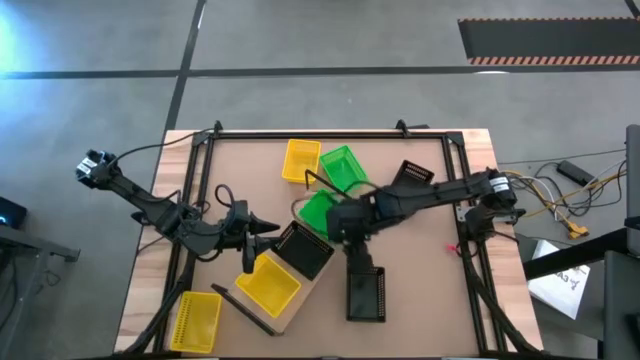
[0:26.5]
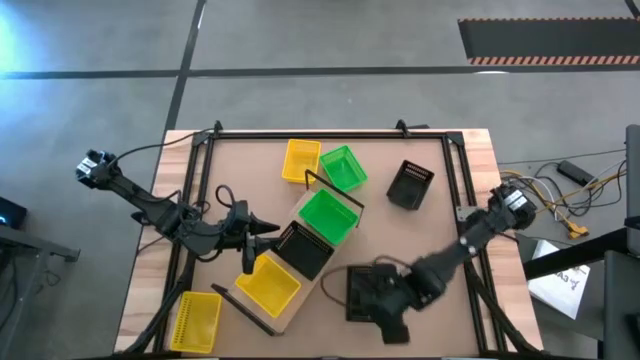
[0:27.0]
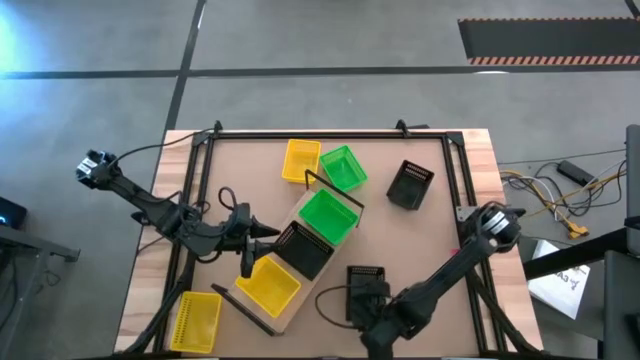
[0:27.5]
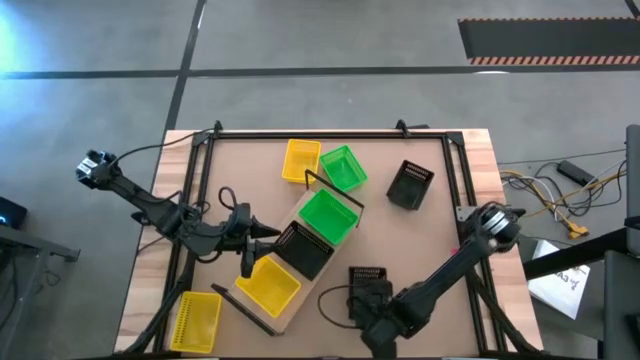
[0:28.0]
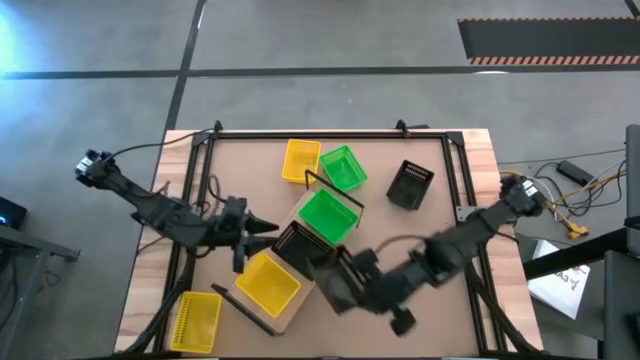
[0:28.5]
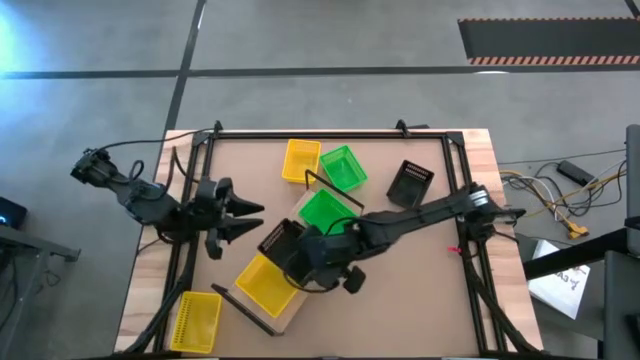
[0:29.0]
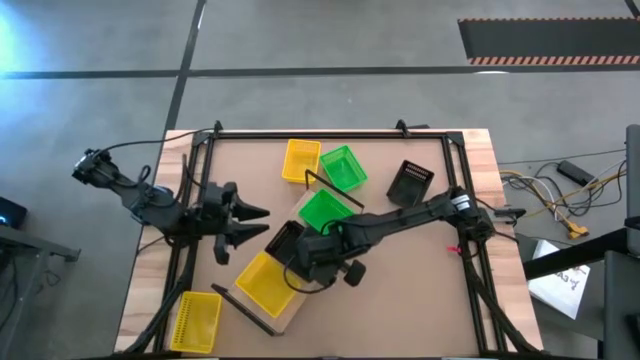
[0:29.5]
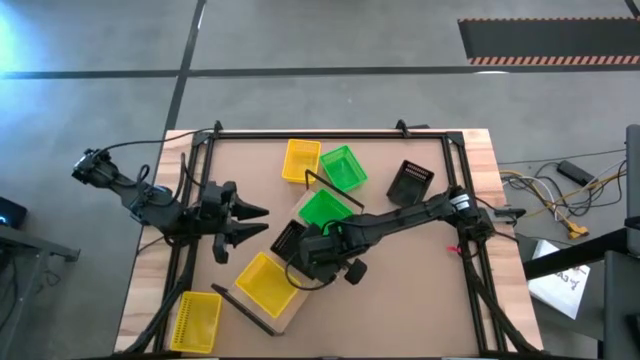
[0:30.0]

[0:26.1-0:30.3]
Task: Stack baskets on shelf by color
Stack the bottom black bin on top of the black bin on the shelf

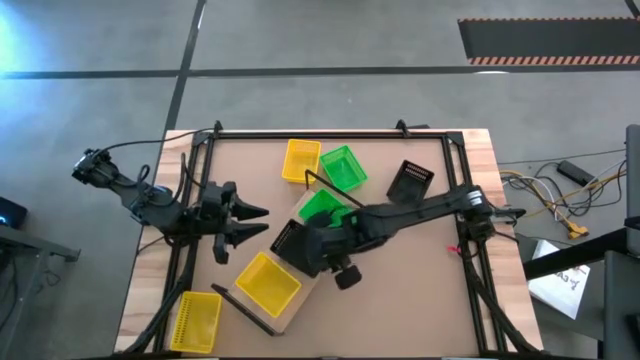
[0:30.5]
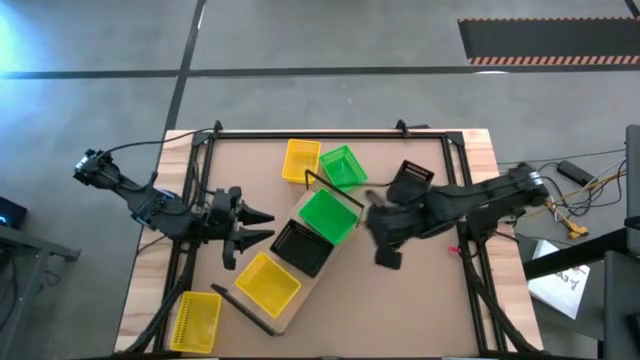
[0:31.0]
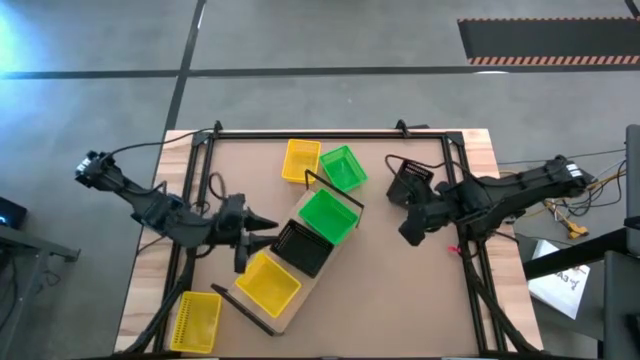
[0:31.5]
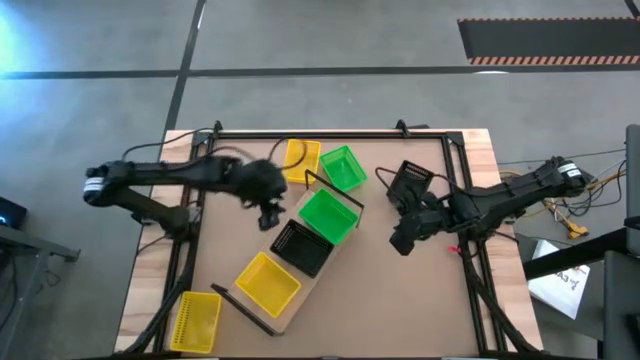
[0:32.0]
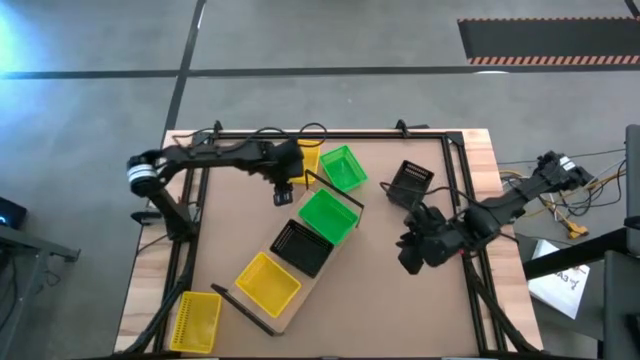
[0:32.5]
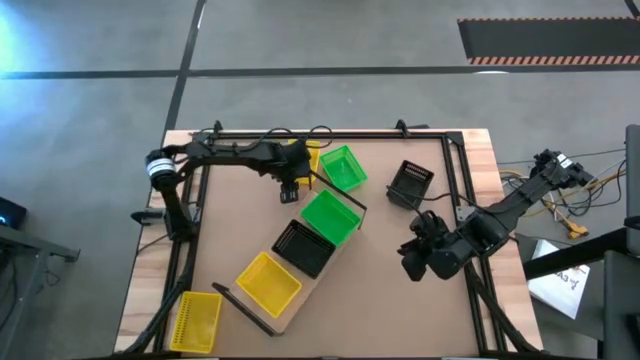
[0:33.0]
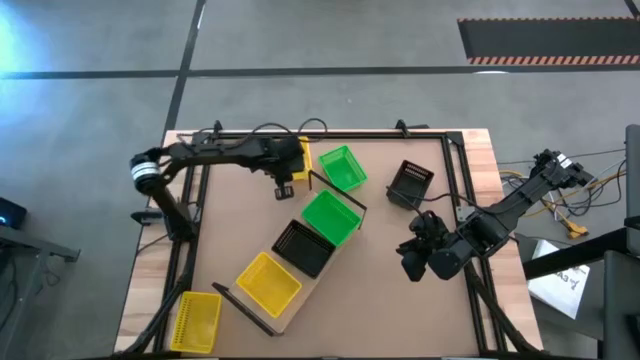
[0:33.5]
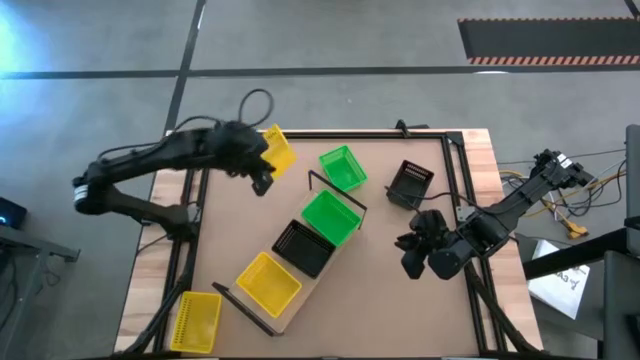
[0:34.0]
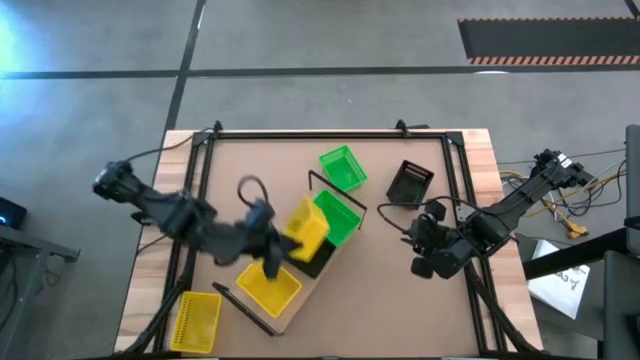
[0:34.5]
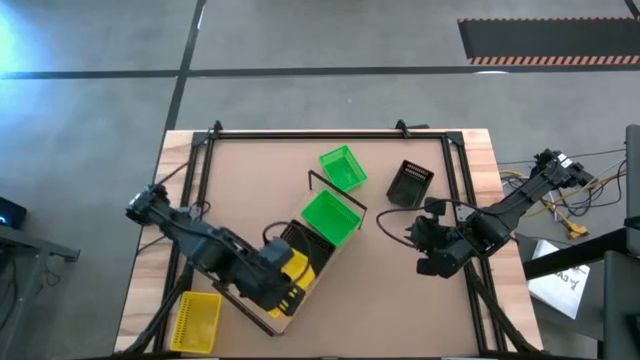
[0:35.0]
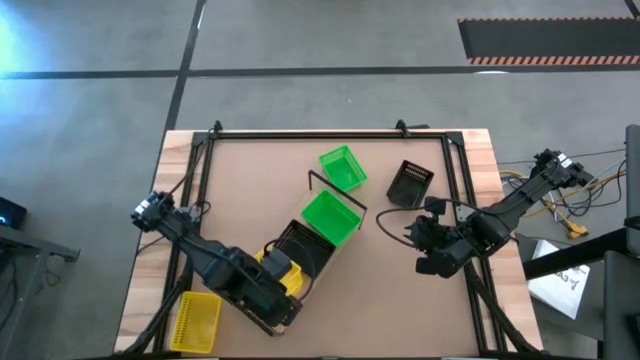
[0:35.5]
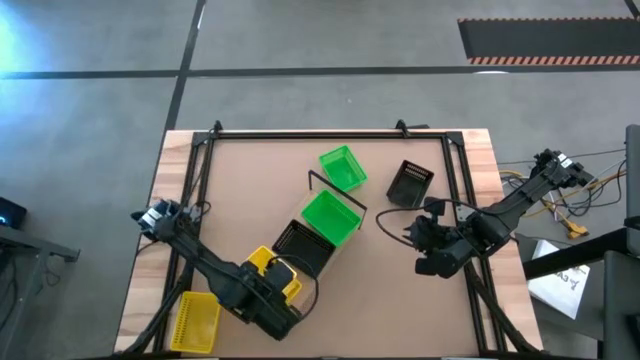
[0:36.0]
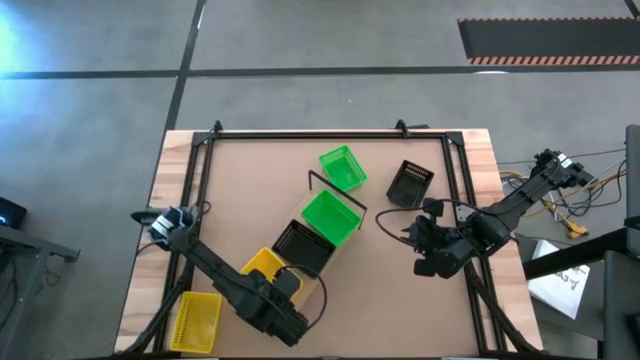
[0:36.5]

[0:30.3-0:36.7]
Stack the top yellow bin on top of the yellow bin on the shelf

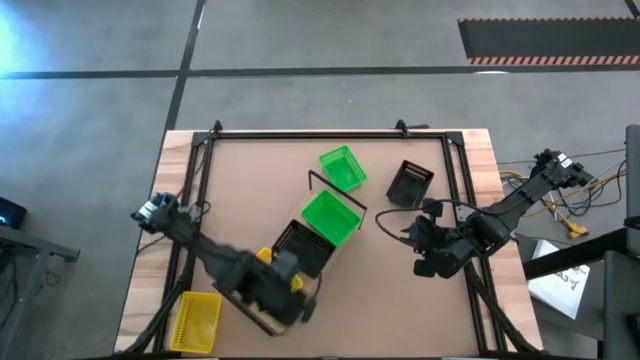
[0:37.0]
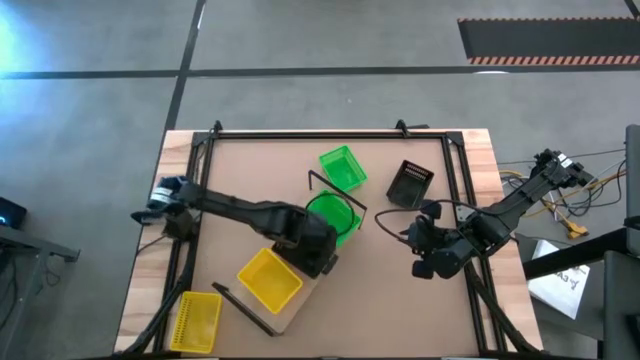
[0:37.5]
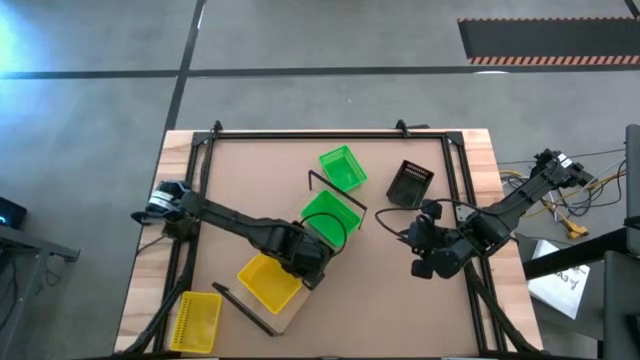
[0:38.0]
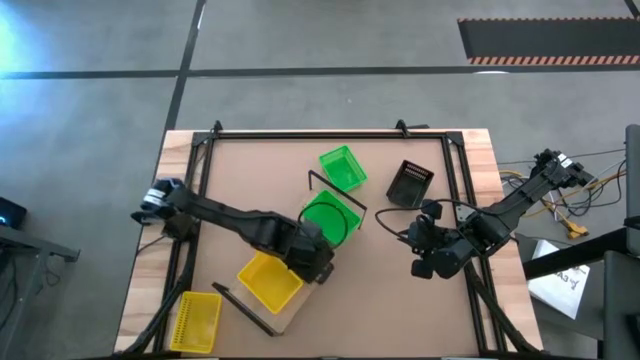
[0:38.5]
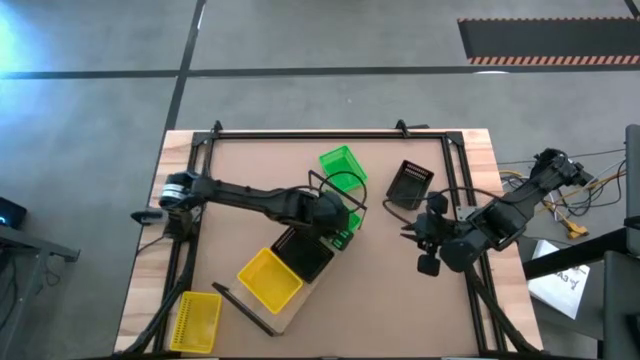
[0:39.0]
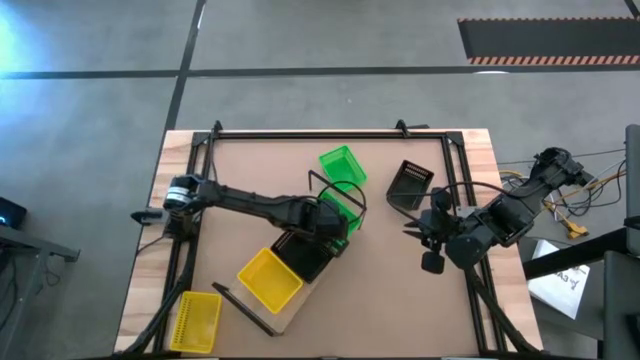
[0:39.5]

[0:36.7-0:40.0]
Adjust the bins on the shelf

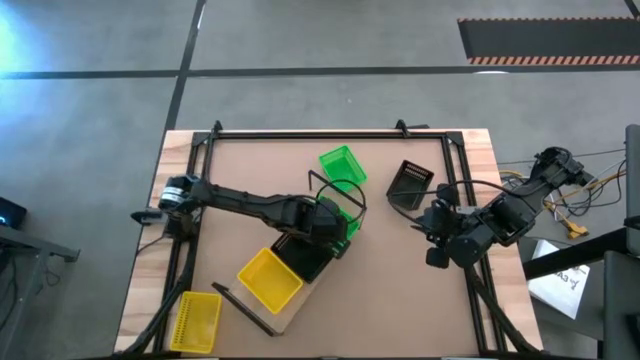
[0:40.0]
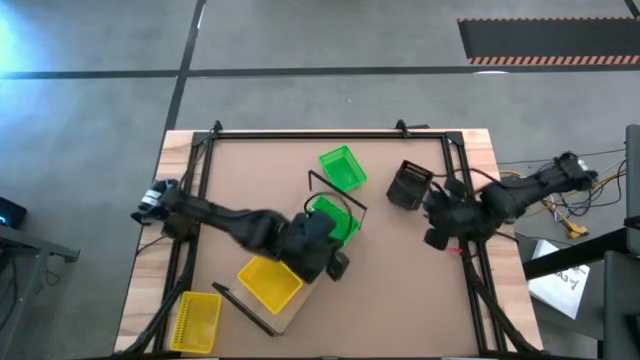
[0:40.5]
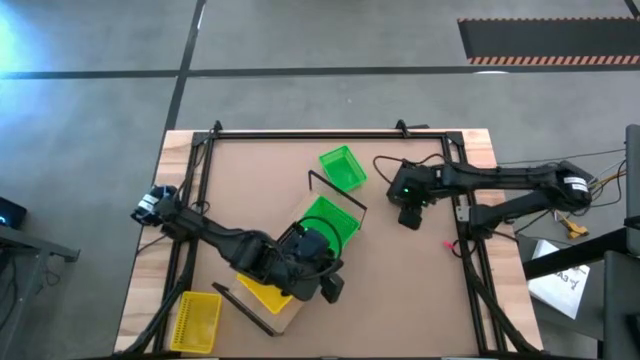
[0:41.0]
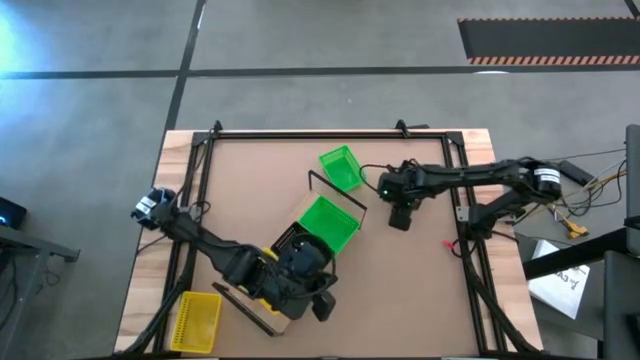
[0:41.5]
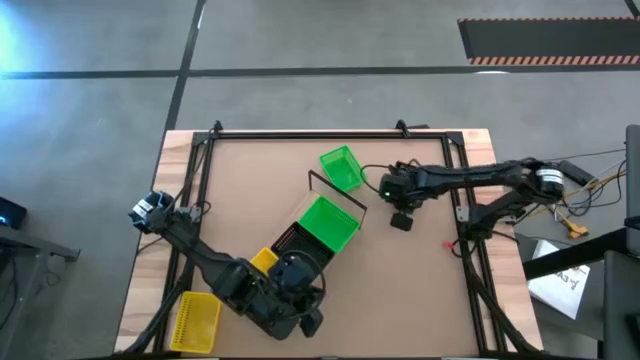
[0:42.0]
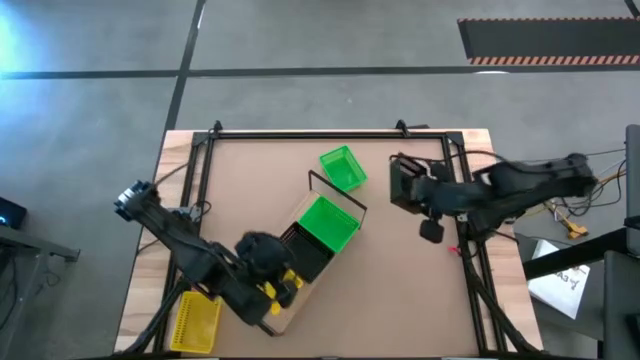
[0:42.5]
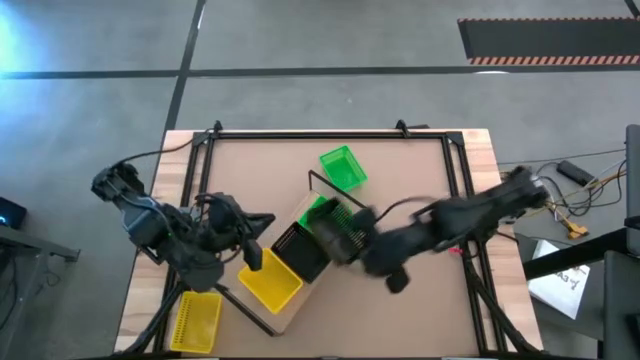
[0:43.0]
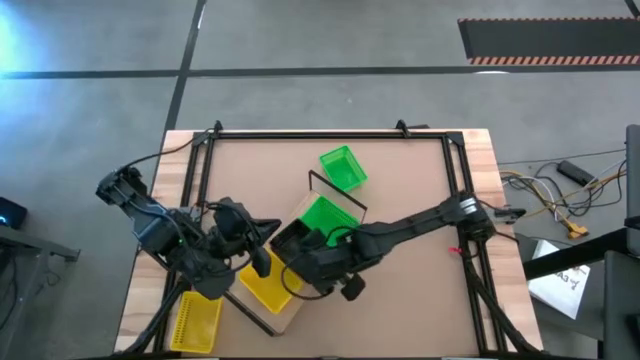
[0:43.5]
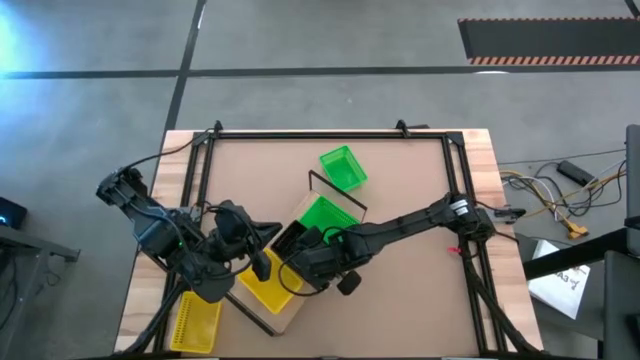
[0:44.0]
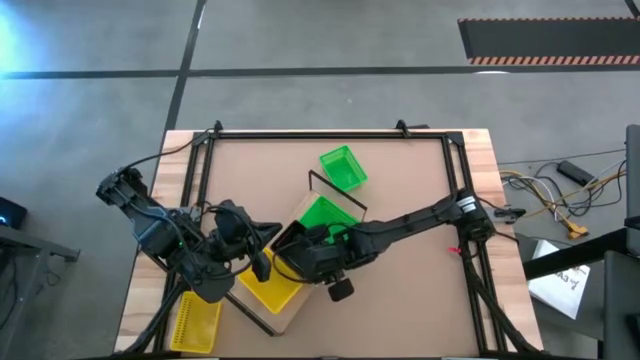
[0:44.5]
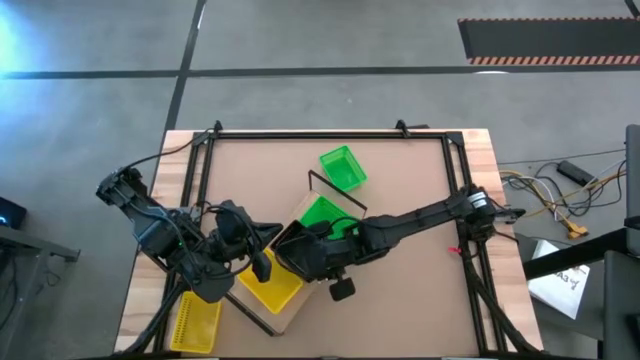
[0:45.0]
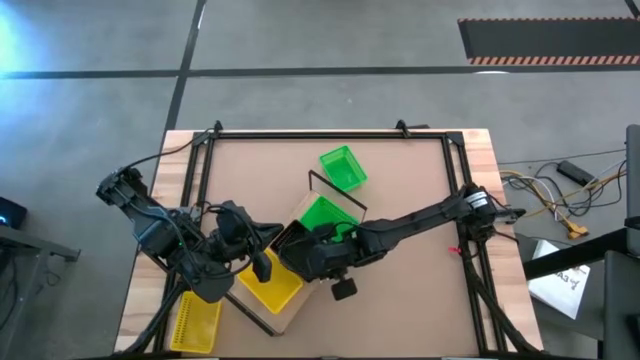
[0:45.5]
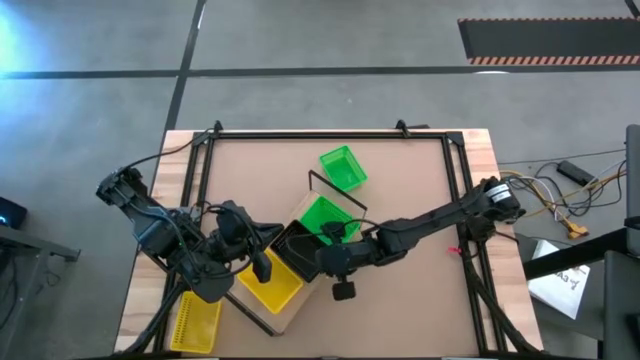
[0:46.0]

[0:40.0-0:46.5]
Stack the black bin on top of the black bins on the shelf

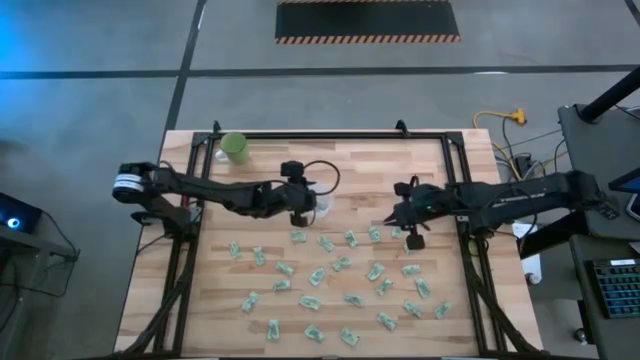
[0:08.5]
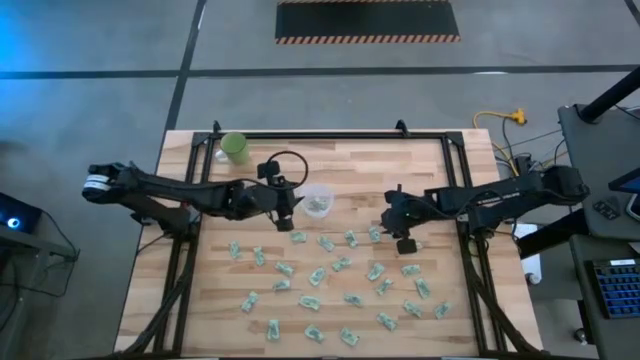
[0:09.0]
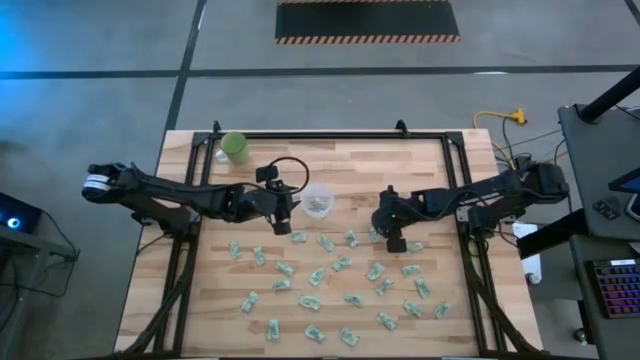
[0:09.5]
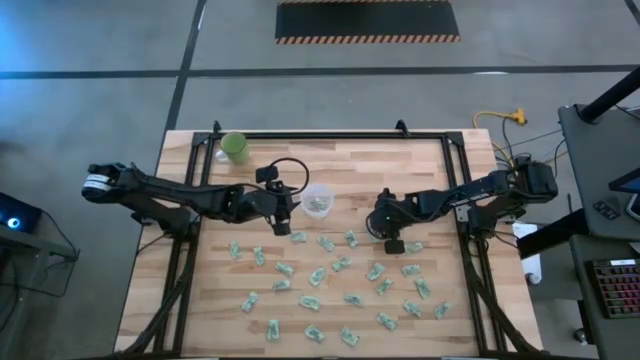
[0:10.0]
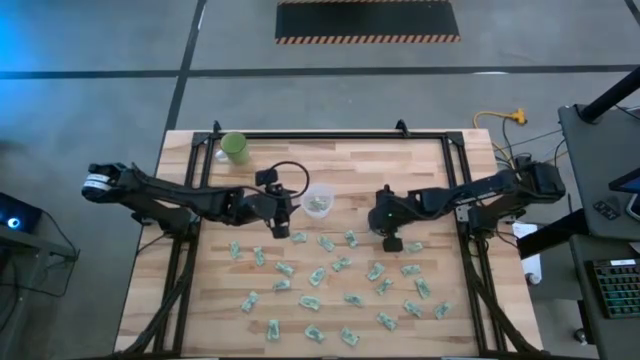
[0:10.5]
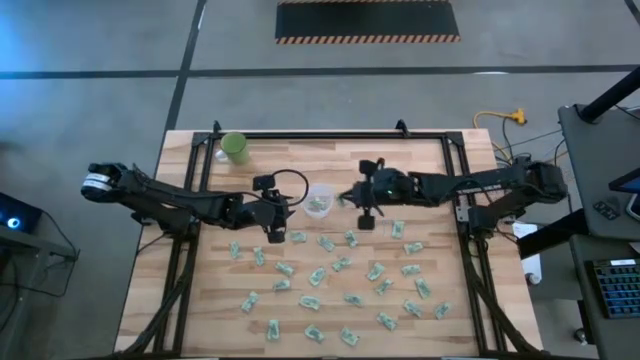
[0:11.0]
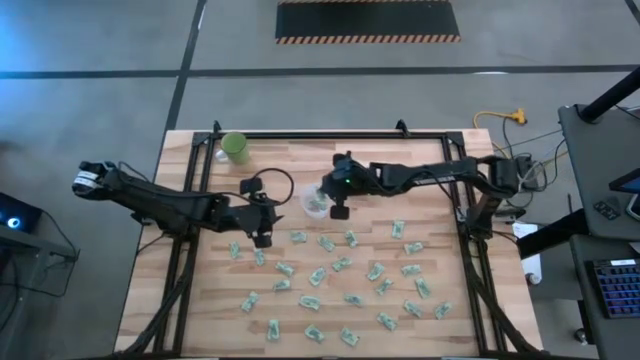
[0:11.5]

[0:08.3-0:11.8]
Task: Pick and place Stevia / Truvia into bins
Put the green stevia packet into the transparent container
